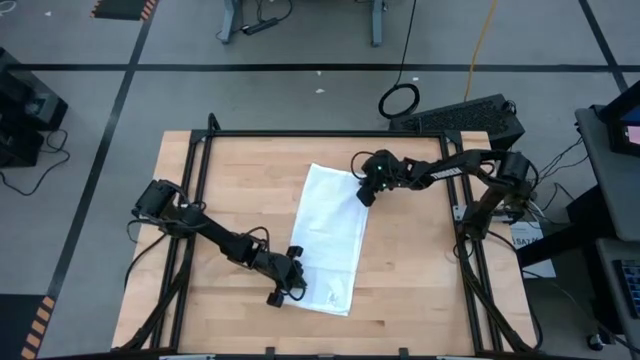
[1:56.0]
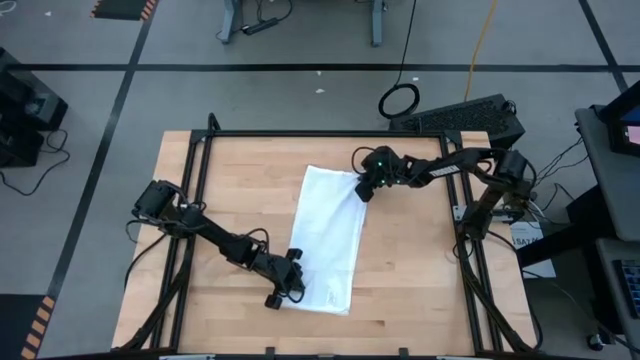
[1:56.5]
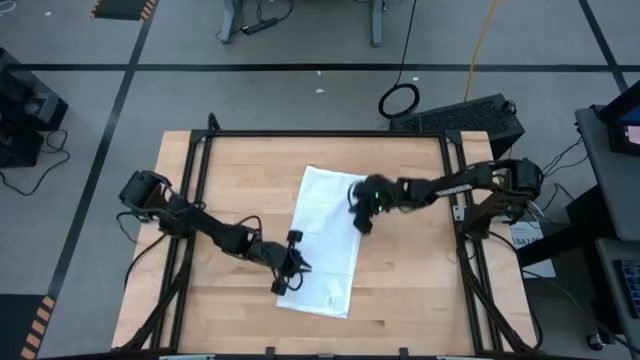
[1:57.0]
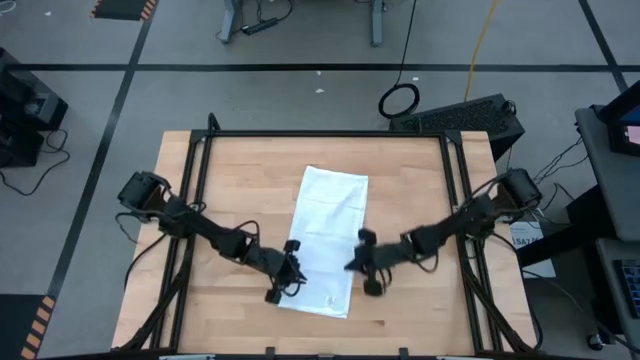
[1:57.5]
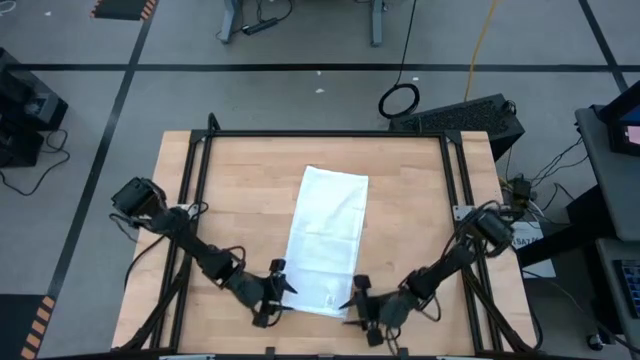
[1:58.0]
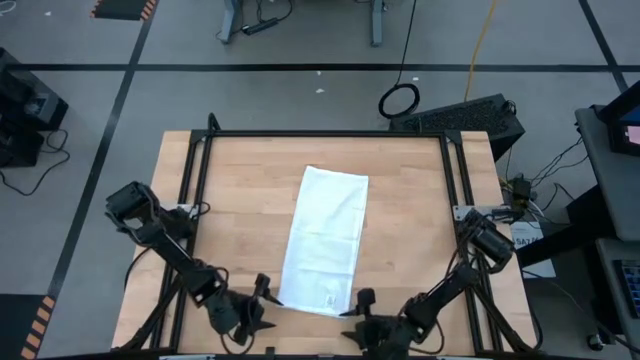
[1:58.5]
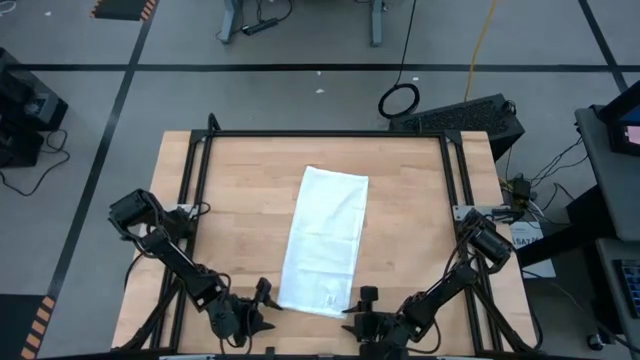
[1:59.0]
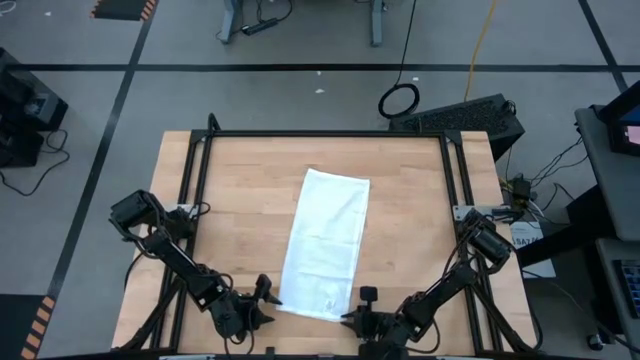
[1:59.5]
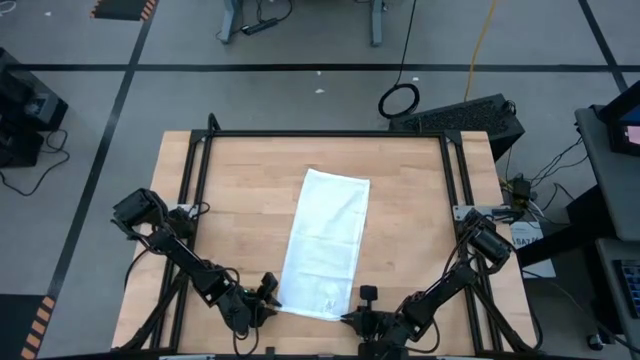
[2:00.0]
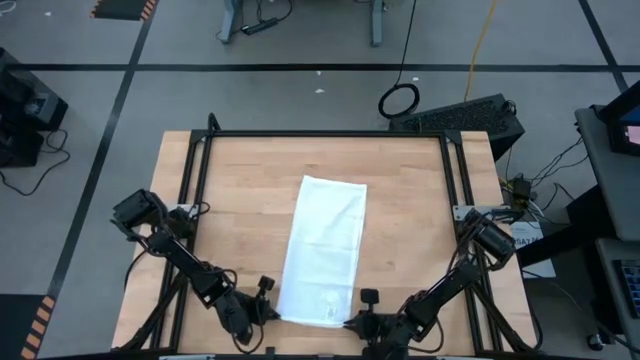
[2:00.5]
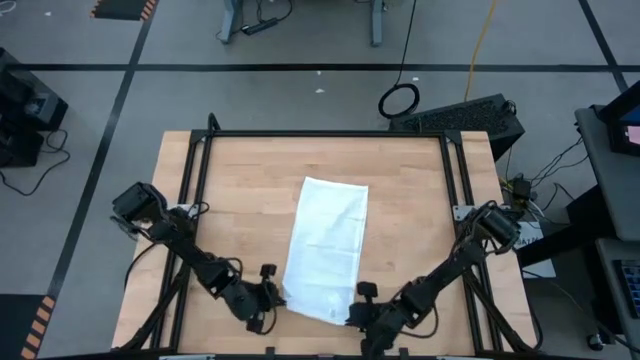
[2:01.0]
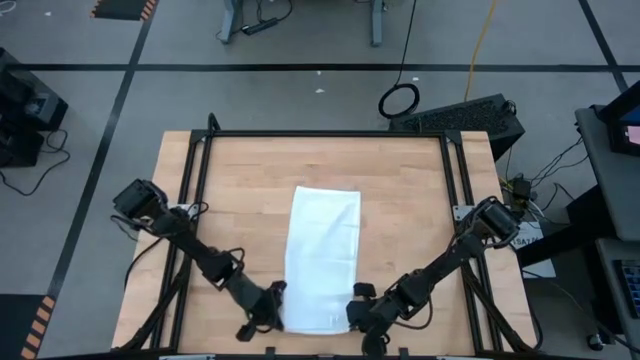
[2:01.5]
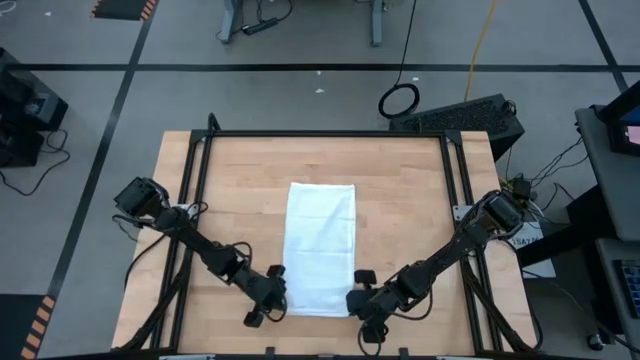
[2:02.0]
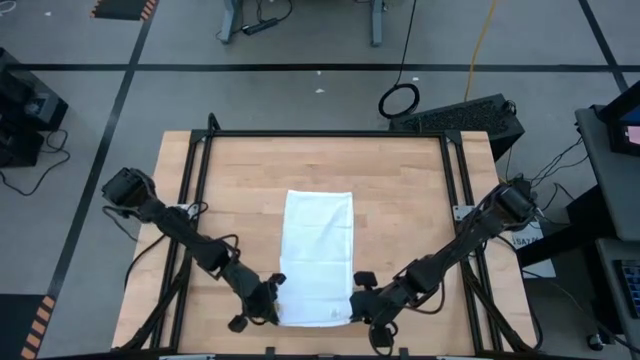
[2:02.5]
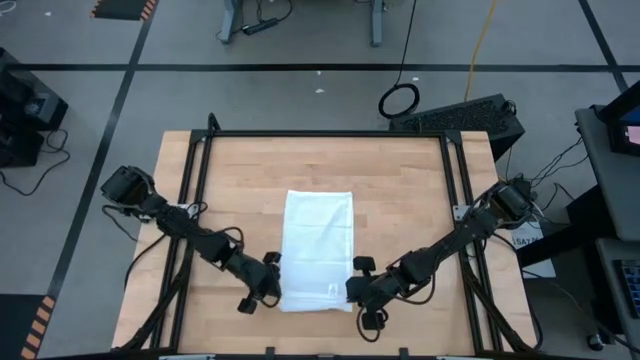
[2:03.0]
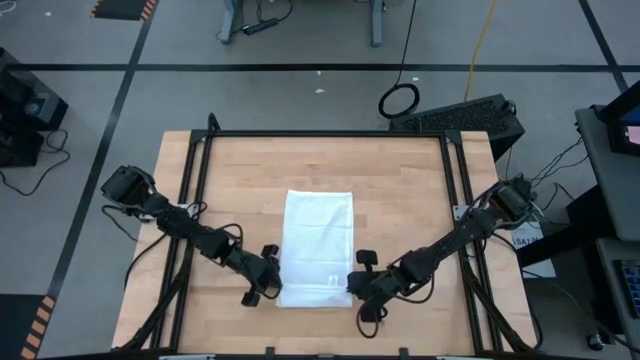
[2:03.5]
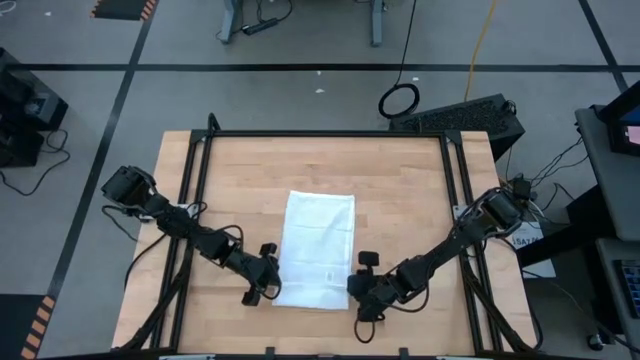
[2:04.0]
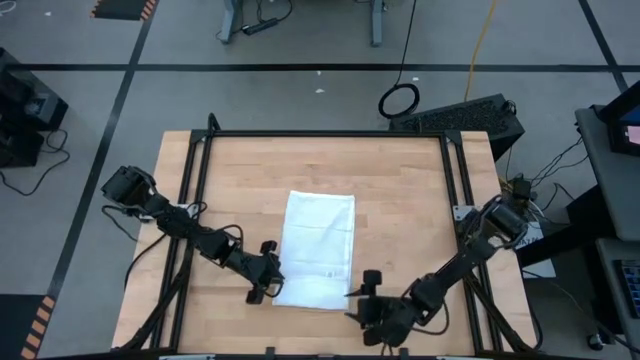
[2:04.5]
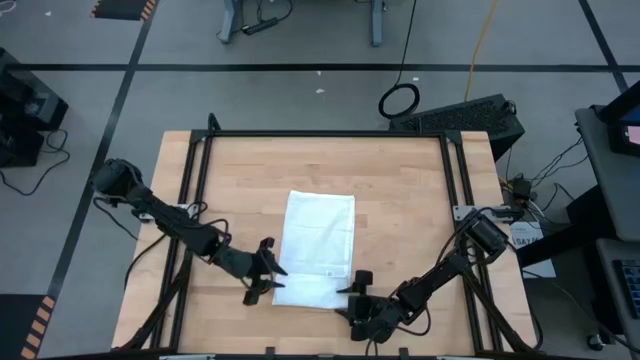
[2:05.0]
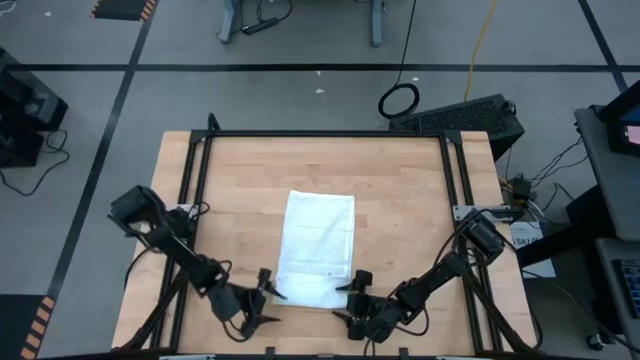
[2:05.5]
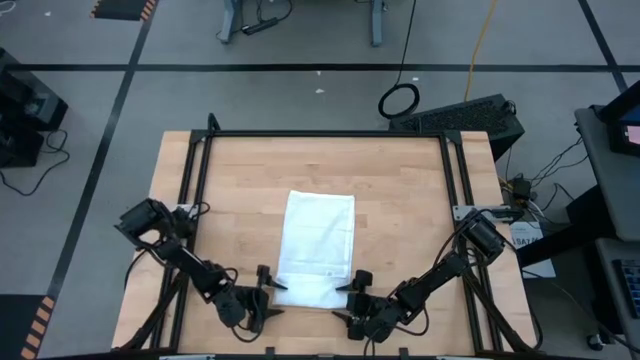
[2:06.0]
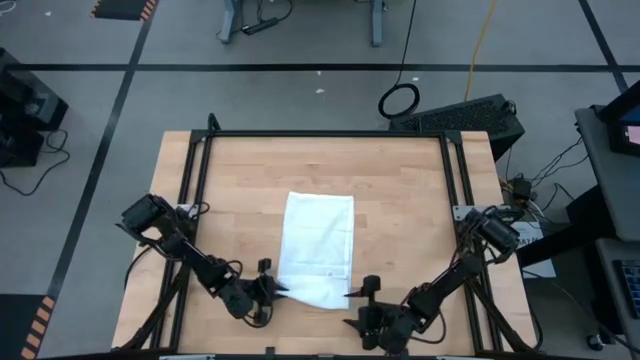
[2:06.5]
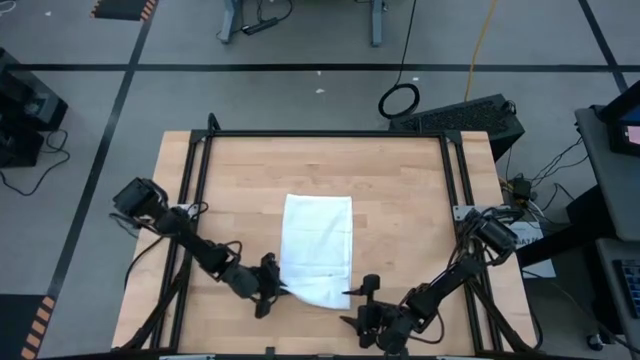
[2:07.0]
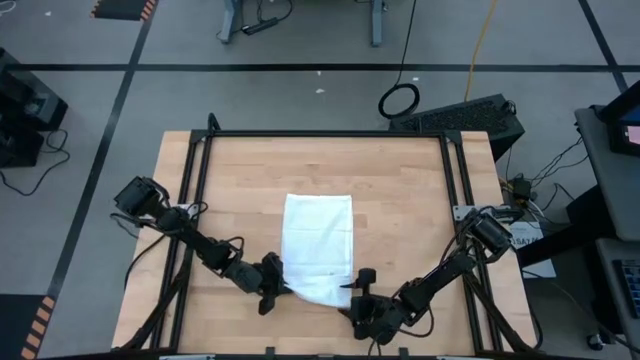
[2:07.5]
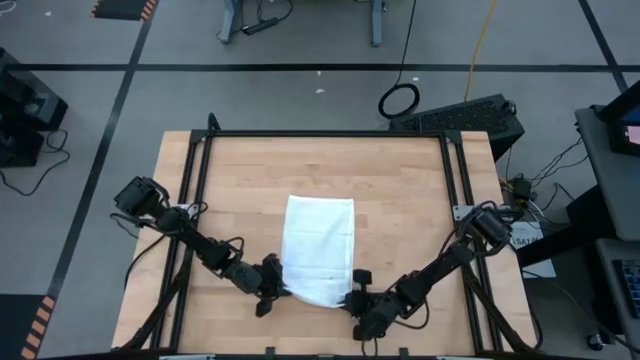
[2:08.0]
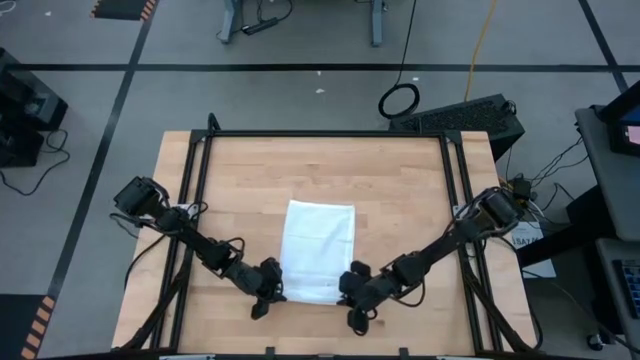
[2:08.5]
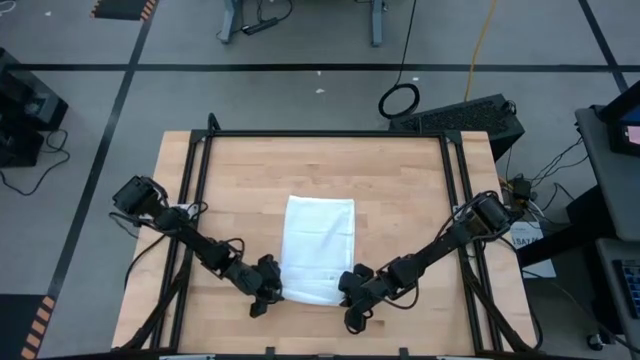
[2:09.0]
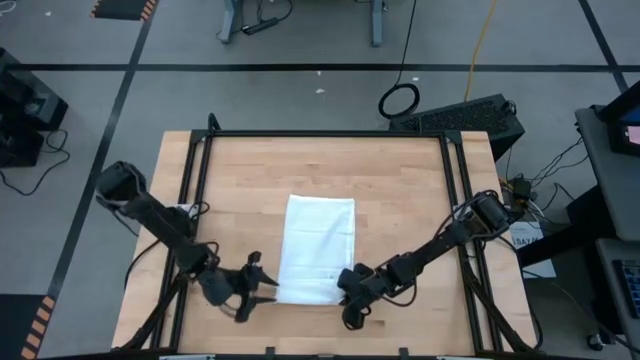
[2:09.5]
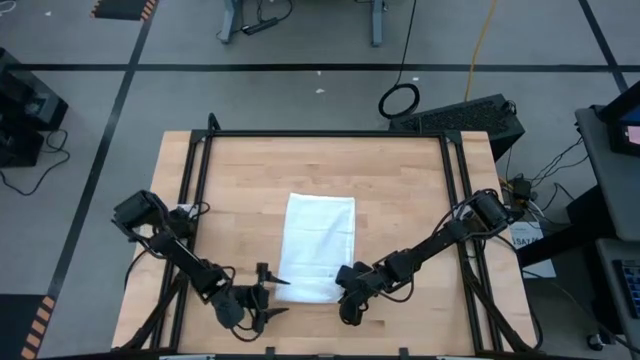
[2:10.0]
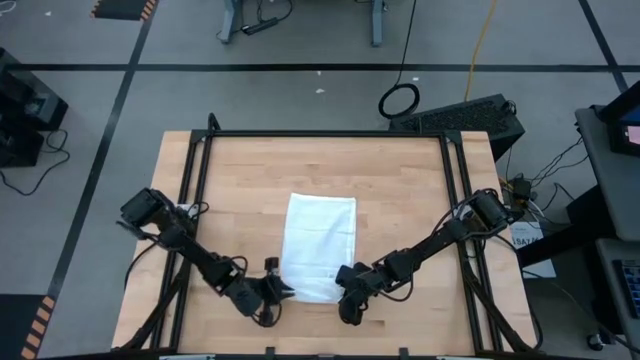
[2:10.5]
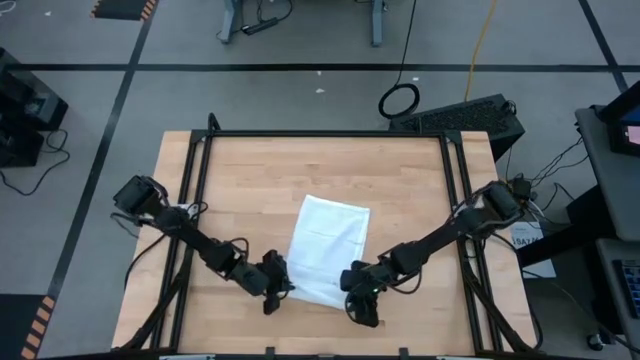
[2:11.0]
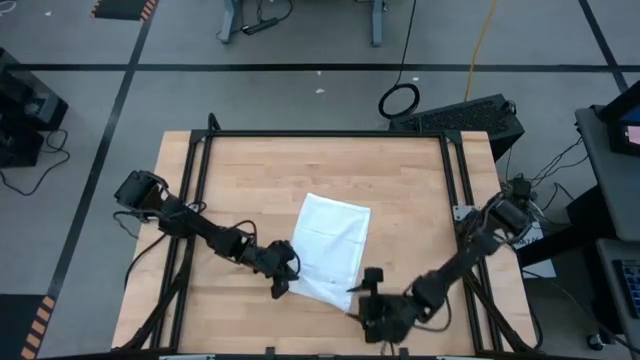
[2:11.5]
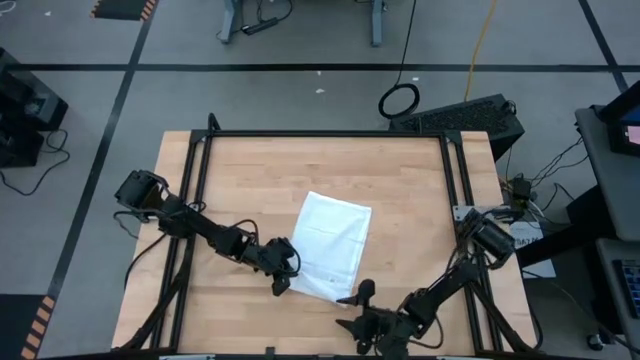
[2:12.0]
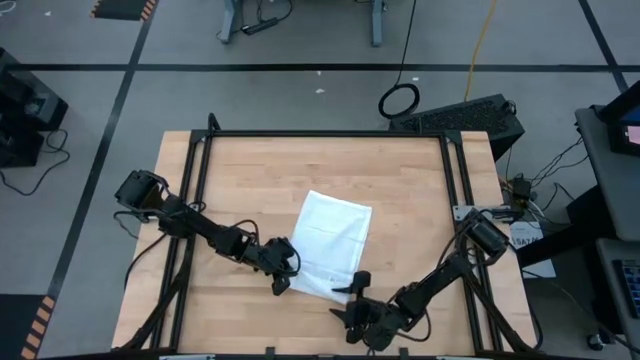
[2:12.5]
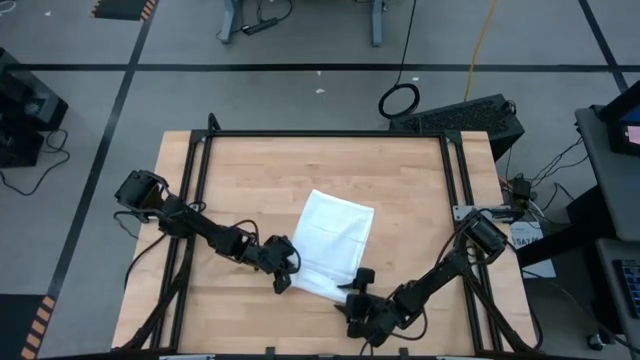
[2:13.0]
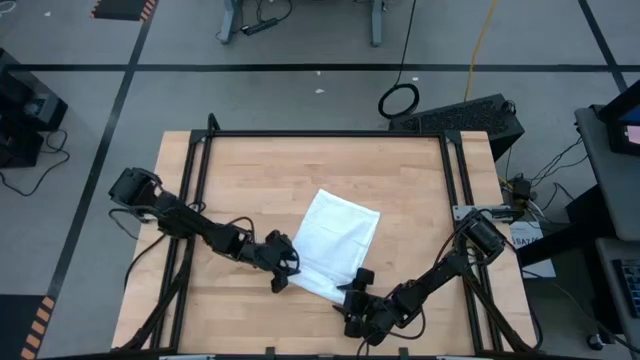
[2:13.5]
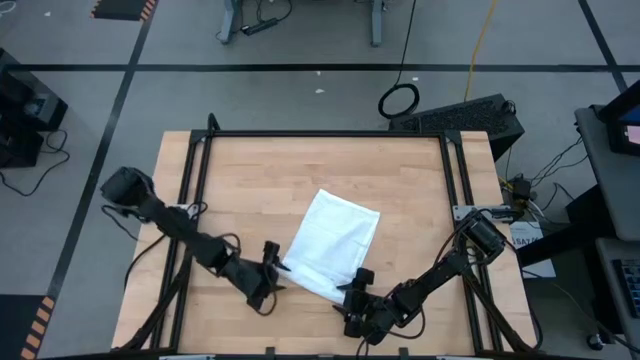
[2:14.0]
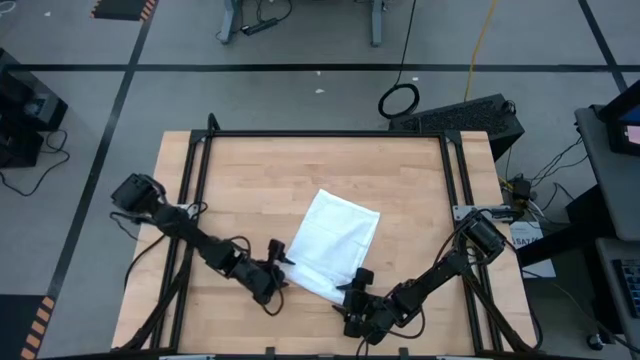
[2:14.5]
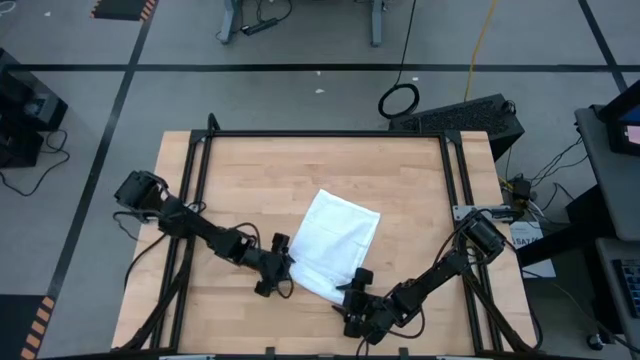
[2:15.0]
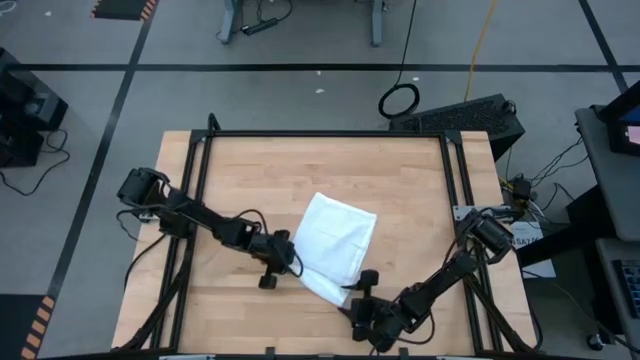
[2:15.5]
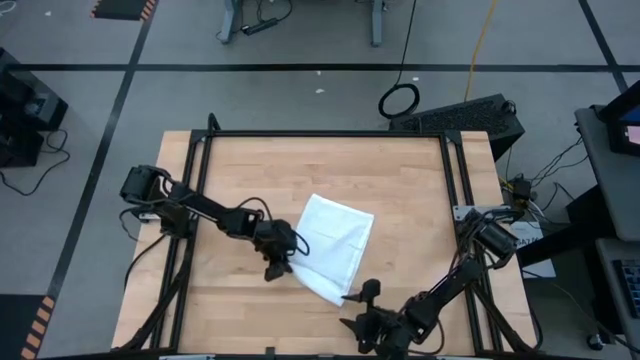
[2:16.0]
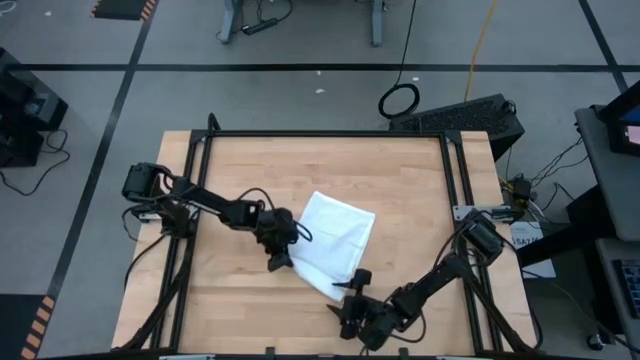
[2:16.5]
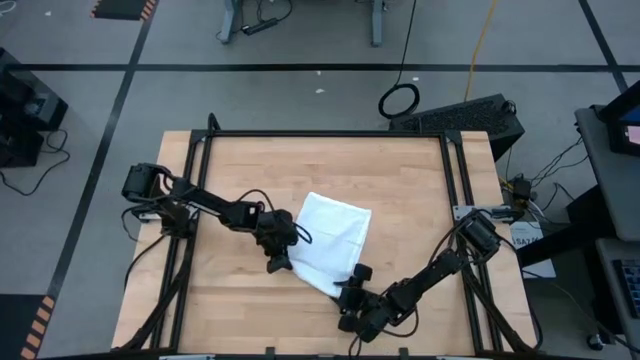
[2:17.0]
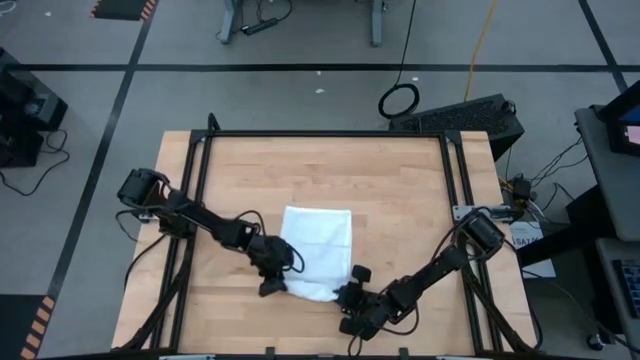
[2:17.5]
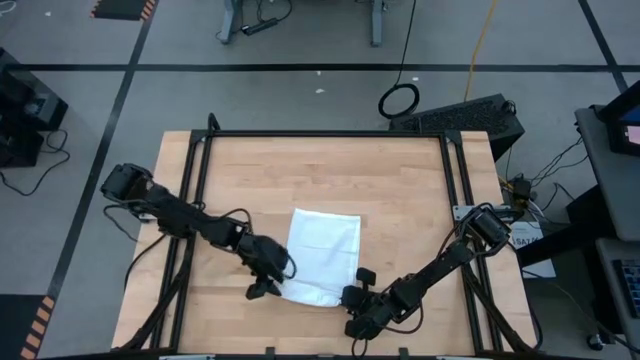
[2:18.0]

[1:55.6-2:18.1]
Task: Roll towel
Roll the white towel
